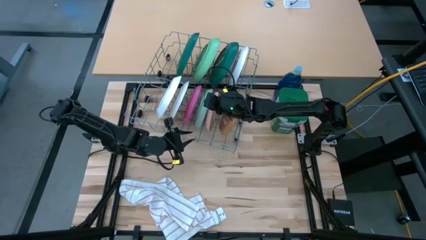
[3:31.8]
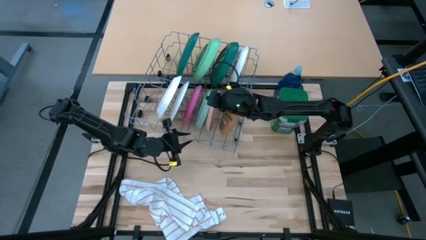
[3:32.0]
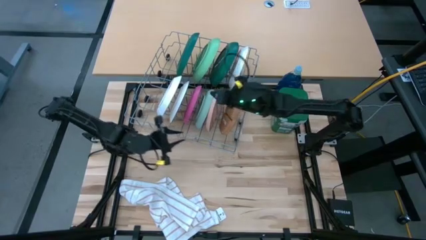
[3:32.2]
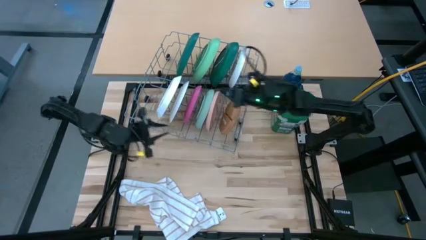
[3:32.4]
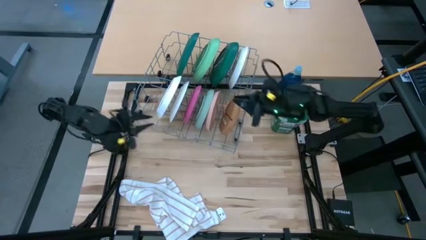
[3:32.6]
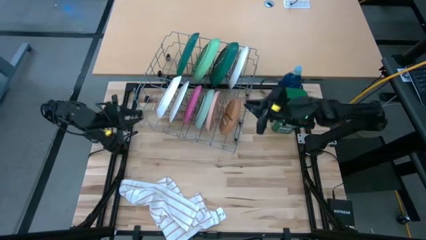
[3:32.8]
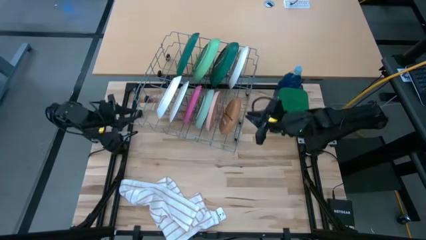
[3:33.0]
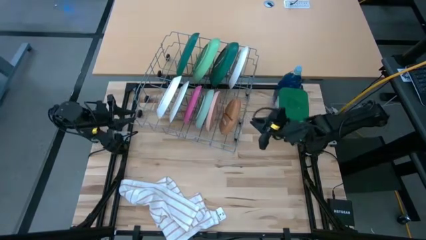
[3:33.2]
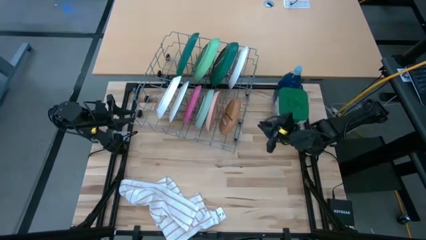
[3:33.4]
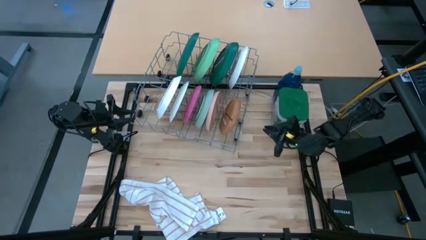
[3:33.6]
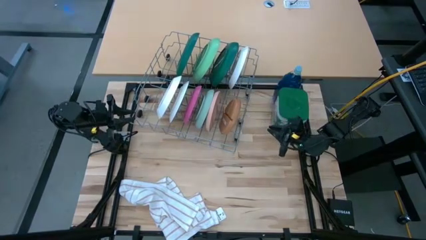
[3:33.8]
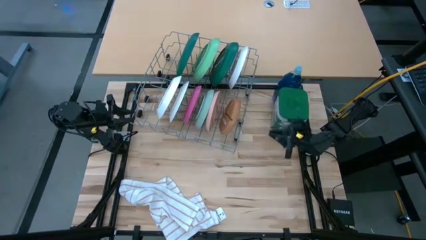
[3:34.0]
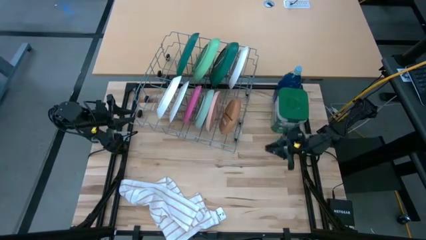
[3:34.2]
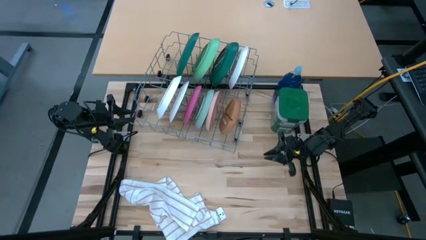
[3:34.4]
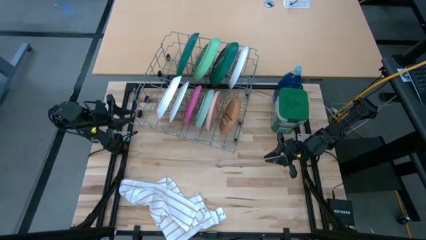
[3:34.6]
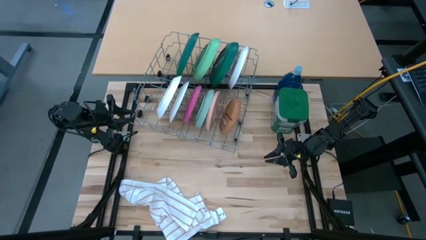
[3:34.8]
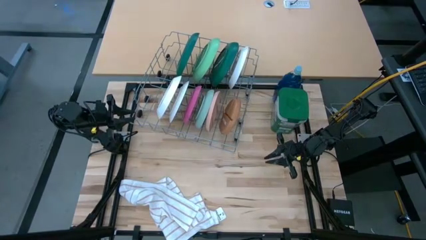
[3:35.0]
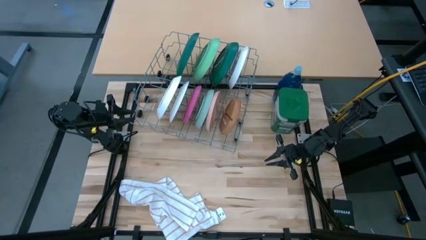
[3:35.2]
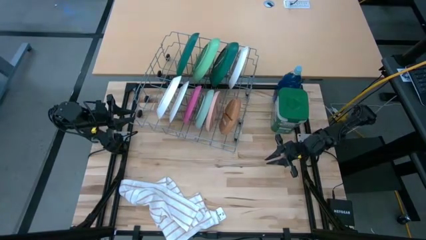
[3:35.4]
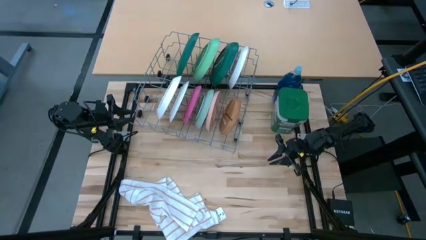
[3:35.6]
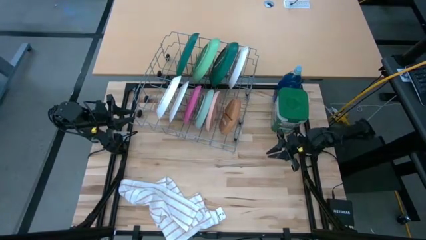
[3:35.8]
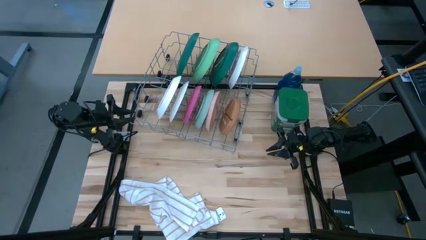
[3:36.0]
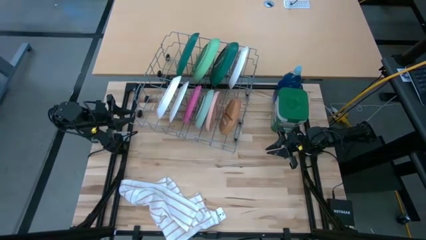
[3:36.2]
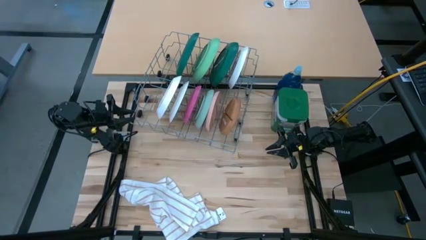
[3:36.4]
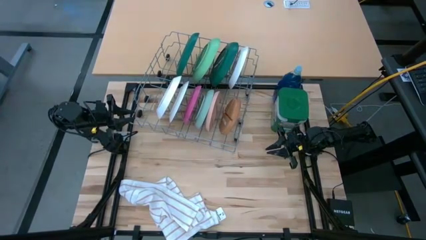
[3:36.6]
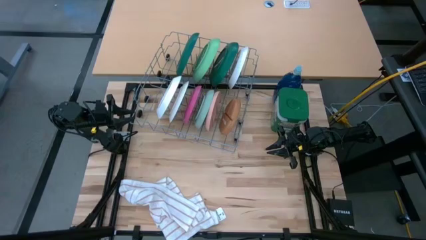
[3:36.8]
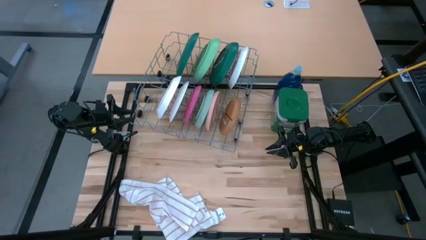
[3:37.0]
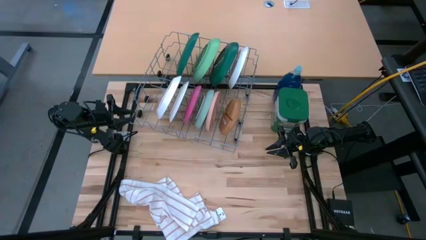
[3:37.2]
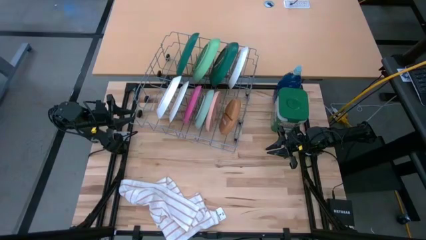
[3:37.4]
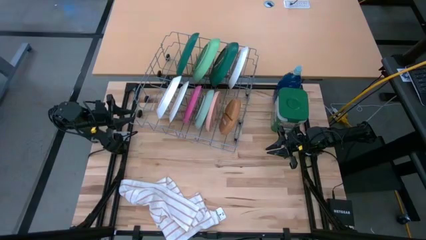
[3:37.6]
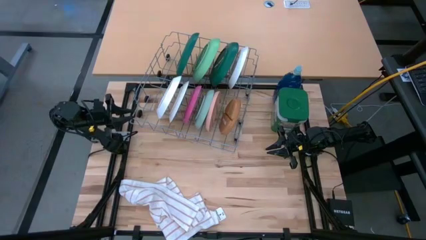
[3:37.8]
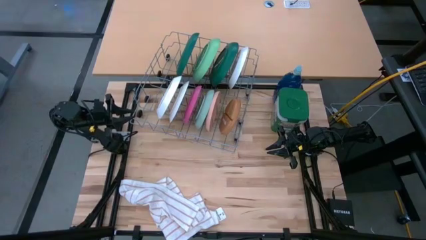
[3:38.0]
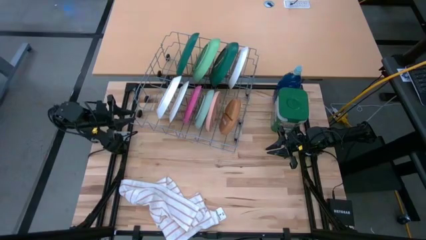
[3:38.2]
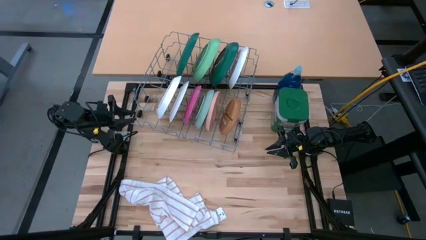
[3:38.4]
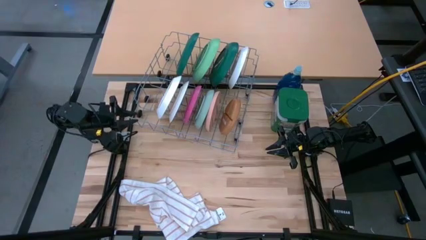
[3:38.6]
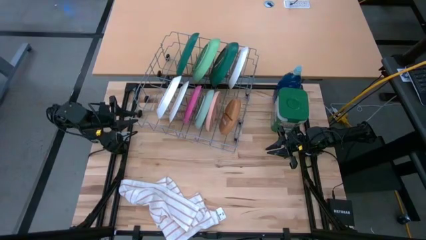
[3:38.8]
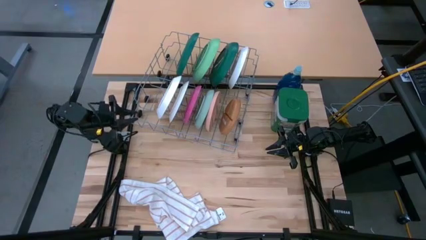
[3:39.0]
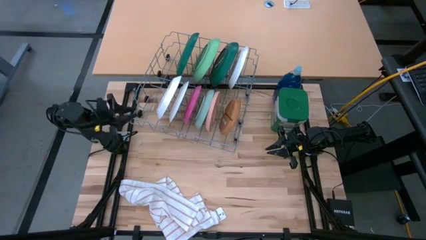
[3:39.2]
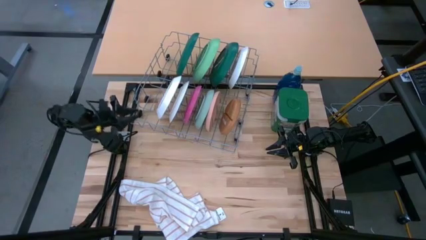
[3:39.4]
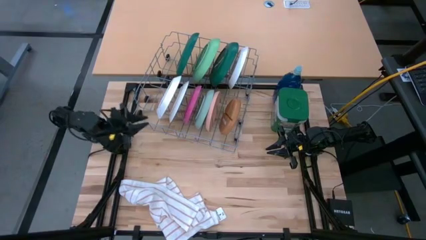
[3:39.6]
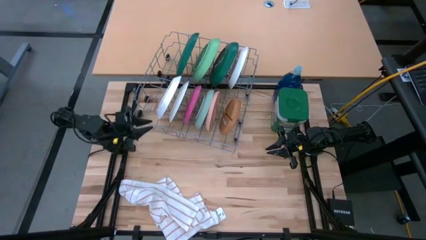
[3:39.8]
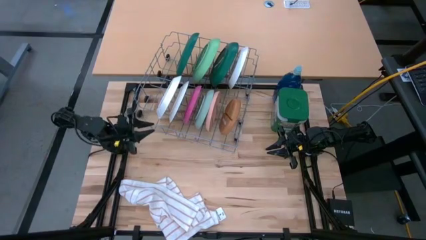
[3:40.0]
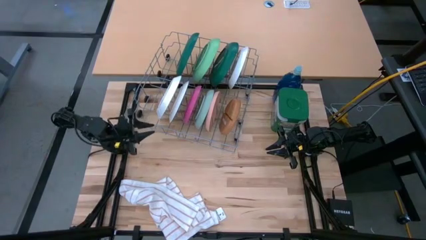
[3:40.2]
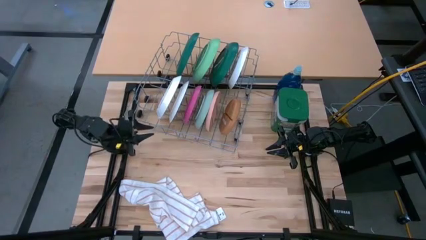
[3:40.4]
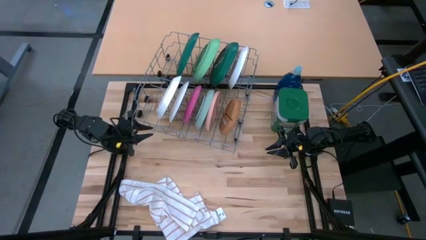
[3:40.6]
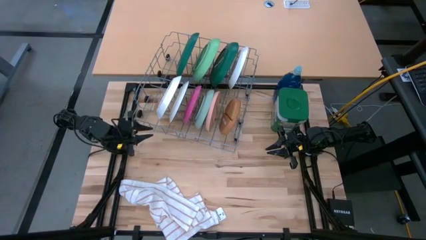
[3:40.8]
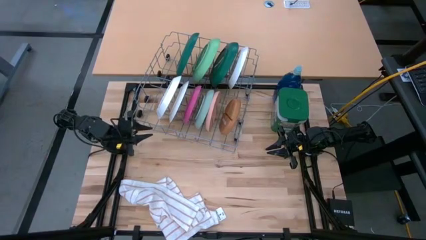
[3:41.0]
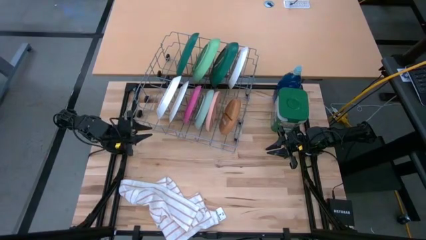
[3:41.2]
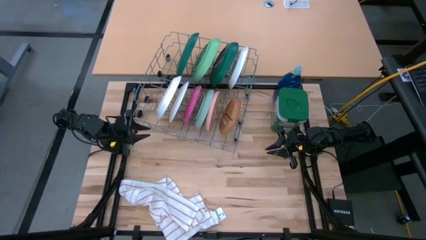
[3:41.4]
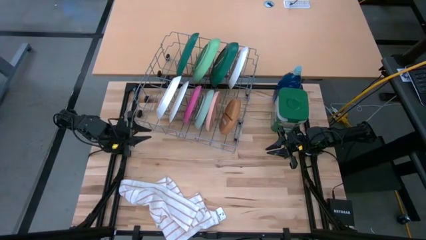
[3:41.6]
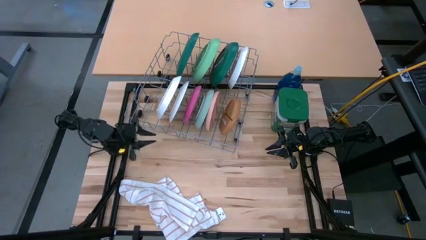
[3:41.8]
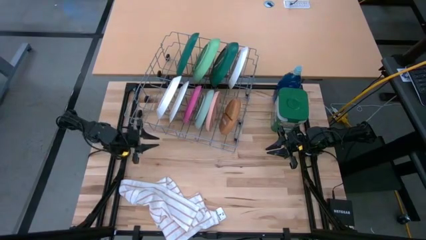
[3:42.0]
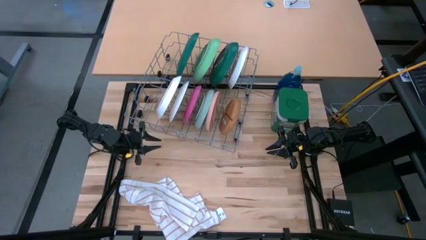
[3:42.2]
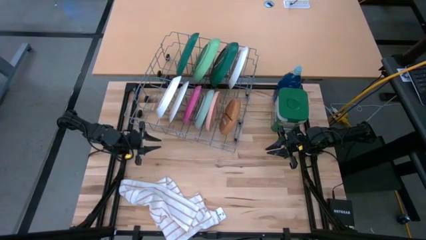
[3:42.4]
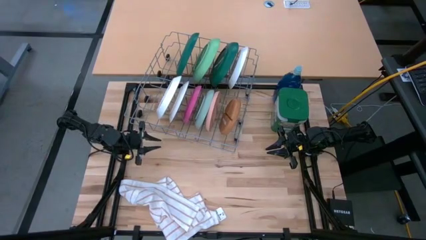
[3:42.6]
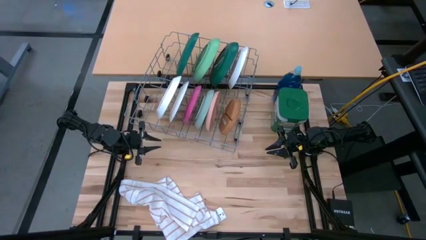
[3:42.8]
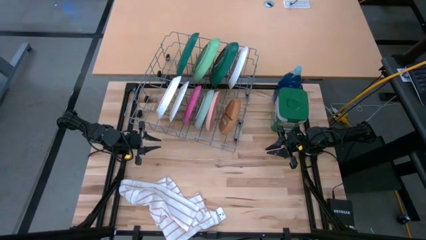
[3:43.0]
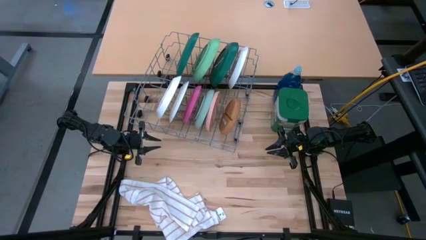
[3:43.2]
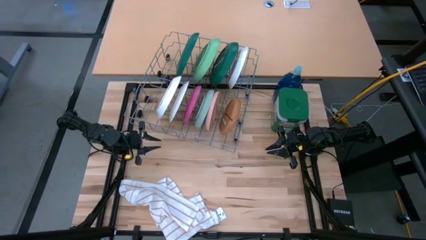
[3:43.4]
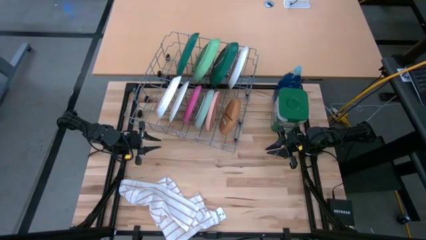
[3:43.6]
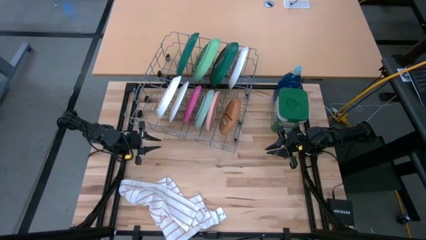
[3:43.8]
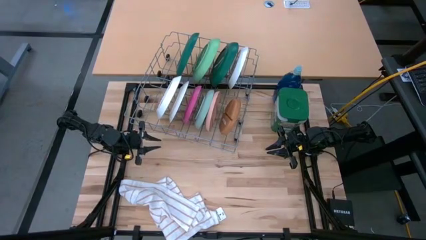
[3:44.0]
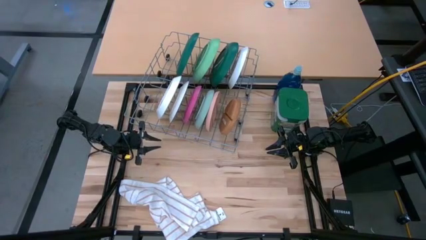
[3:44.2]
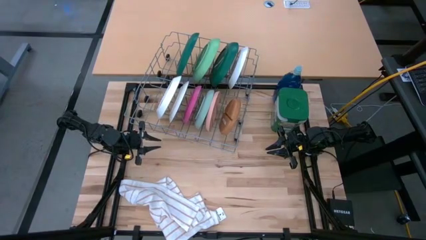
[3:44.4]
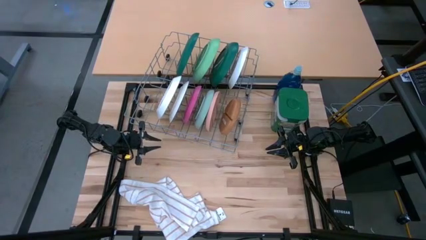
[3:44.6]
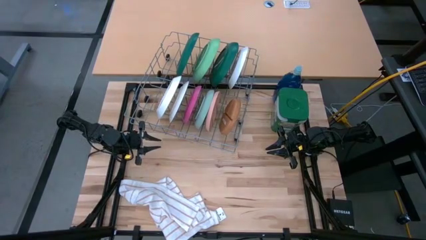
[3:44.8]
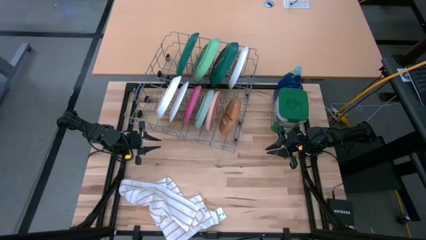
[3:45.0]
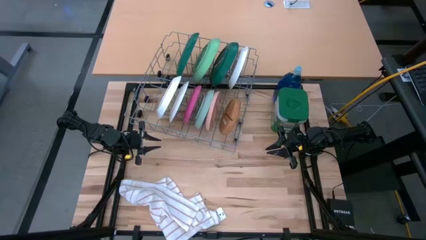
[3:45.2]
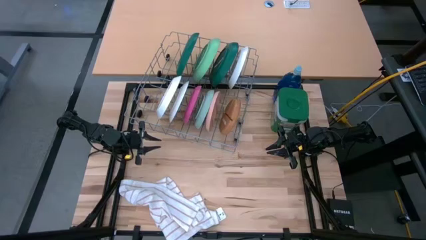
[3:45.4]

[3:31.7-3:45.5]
Task: Sort dishes
Return to Home Position

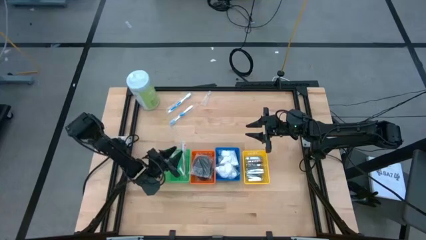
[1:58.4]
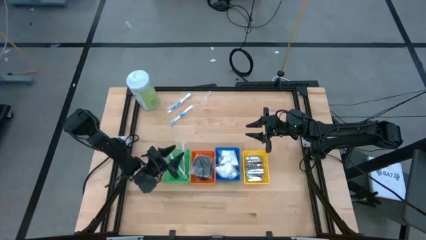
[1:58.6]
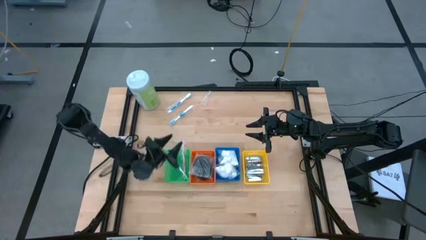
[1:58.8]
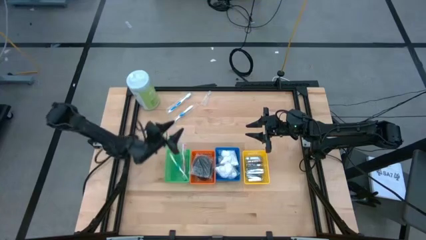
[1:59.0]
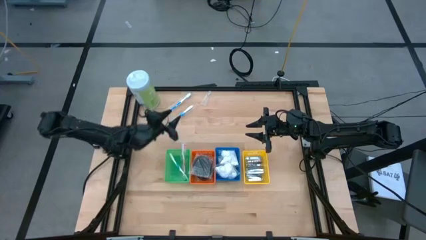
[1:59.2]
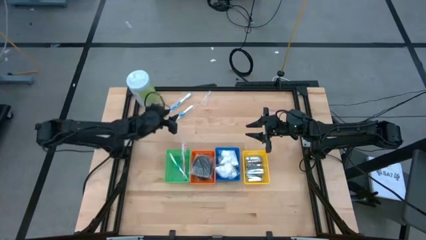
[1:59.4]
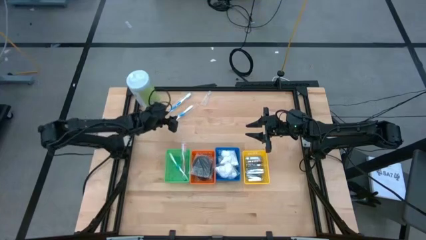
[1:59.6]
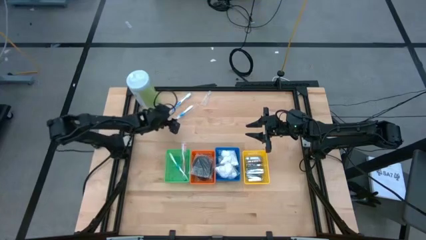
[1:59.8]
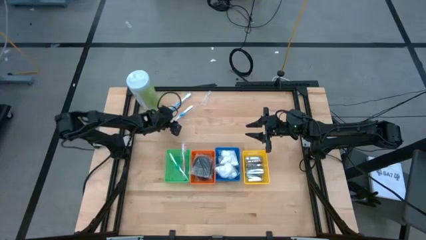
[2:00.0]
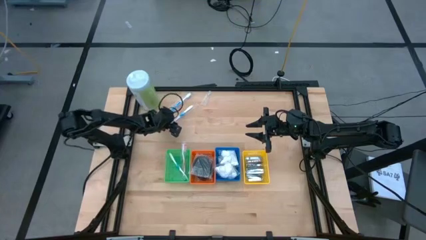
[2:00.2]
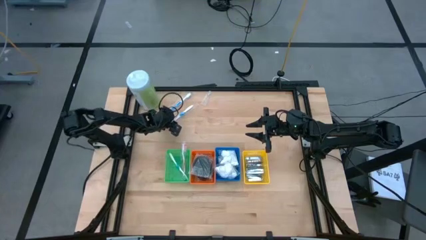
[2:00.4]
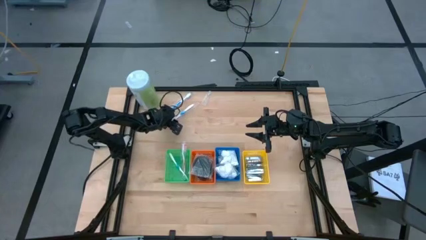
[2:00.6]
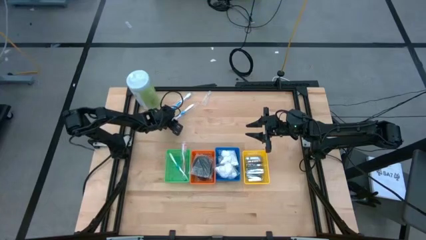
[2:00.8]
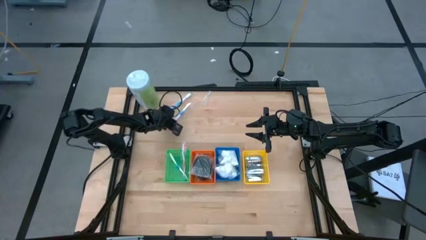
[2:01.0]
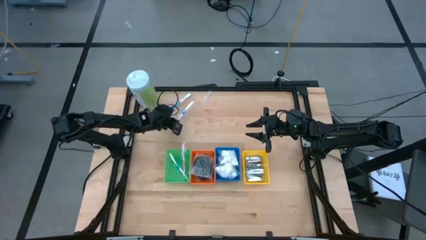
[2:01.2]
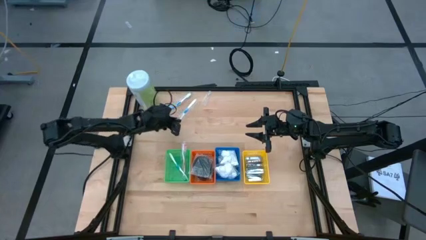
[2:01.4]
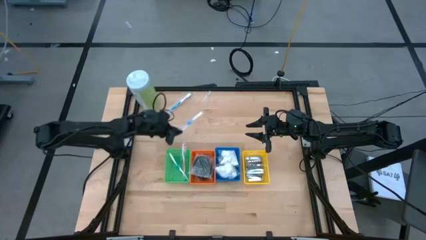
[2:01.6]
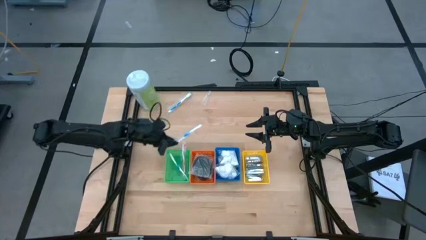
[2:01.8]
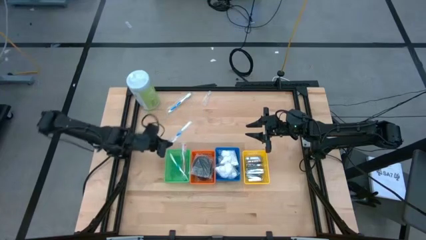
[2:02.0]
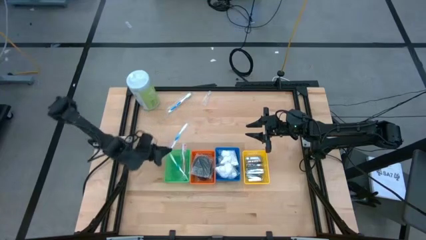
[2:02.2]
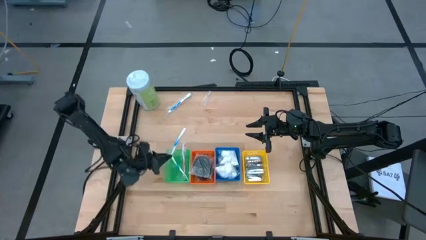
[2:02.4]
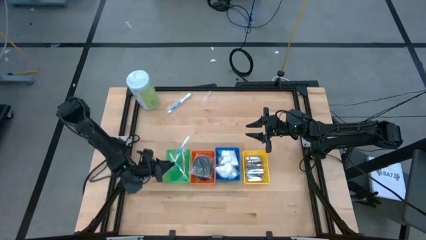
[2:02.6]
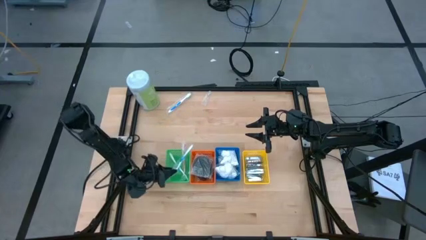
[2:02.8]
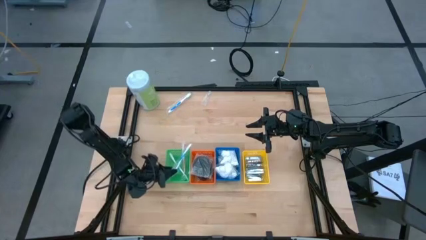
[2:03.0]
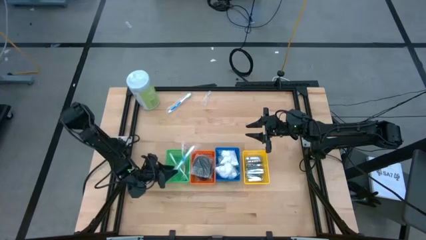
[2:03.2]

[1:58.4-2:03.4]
Task: Pick & Place Travel size toiletries
Put the blue toothbrush into the green basket
